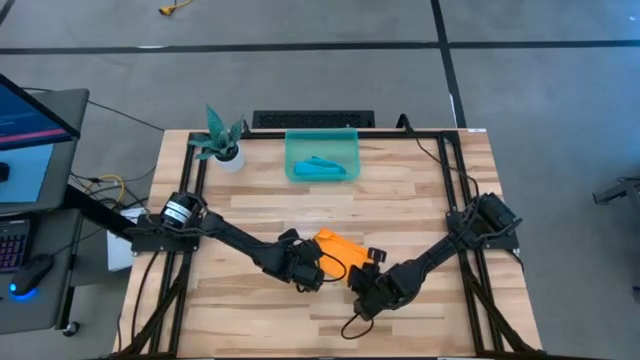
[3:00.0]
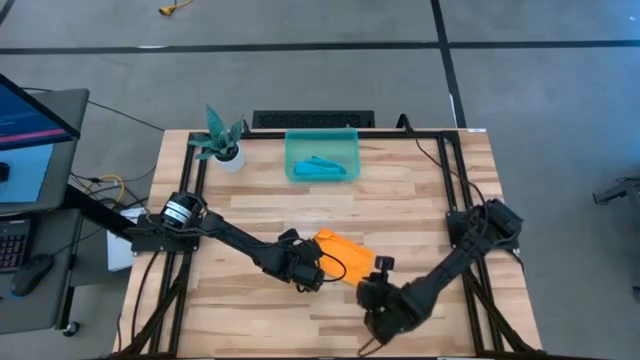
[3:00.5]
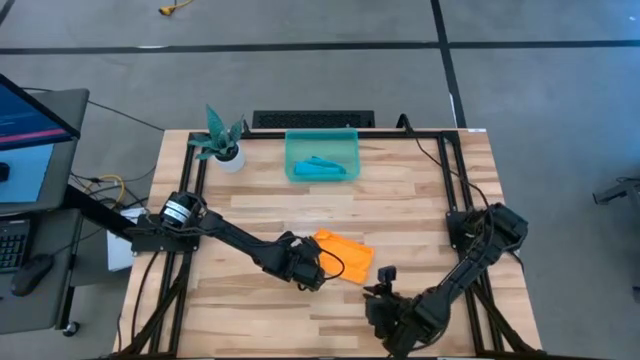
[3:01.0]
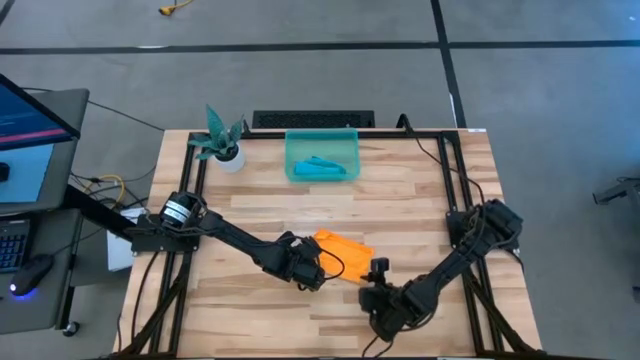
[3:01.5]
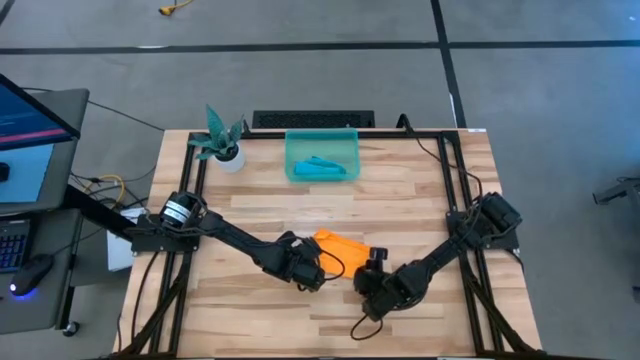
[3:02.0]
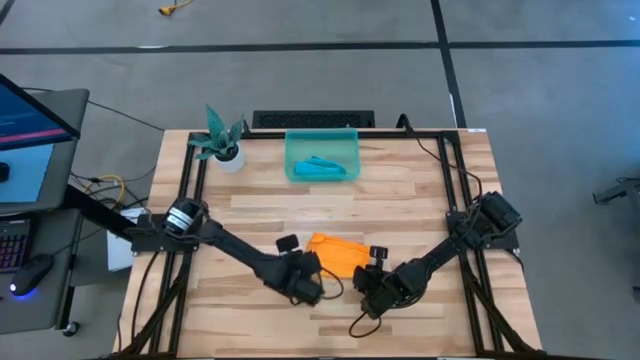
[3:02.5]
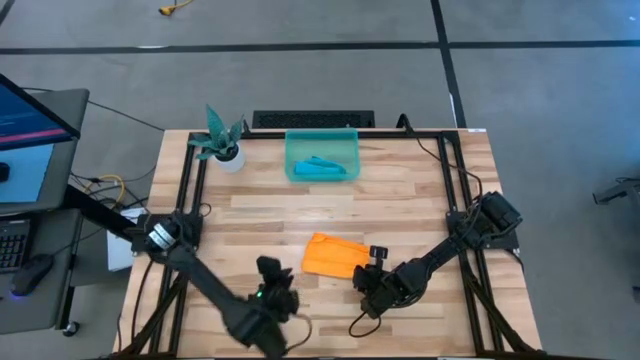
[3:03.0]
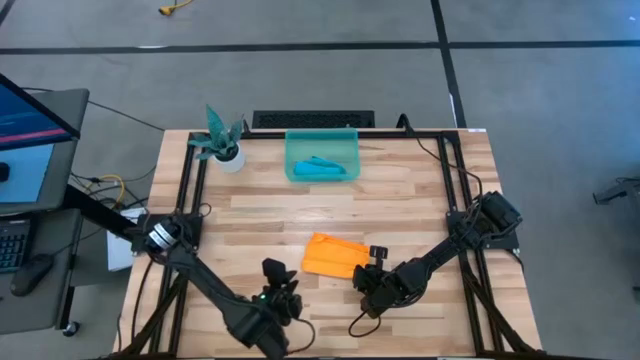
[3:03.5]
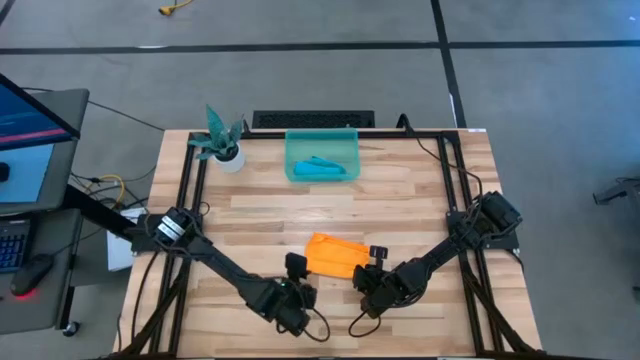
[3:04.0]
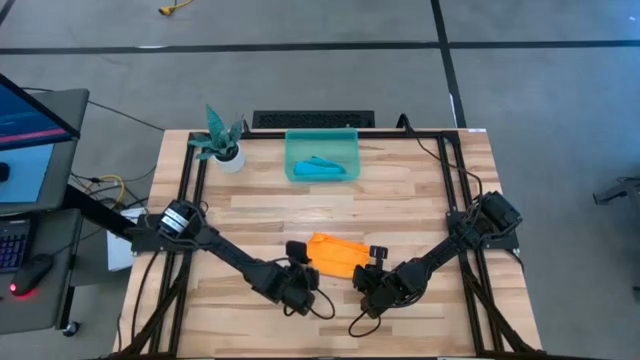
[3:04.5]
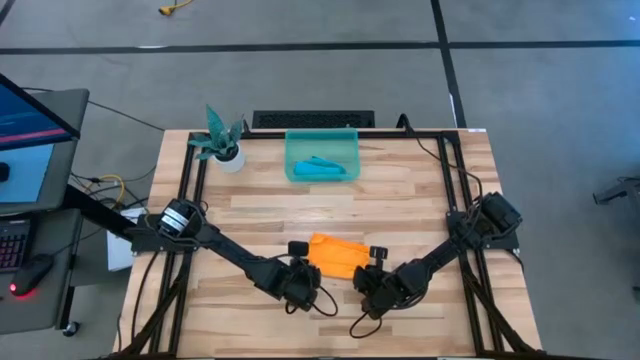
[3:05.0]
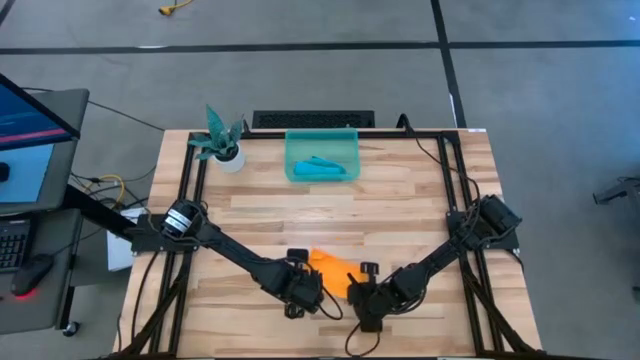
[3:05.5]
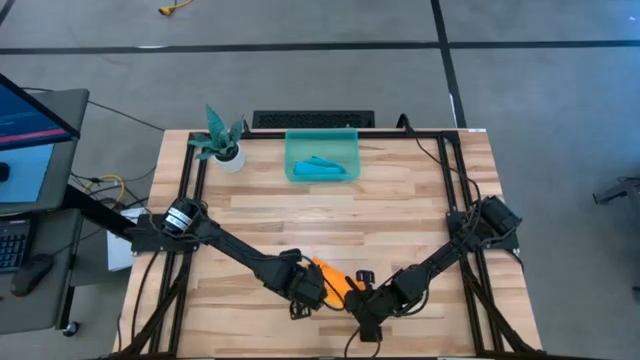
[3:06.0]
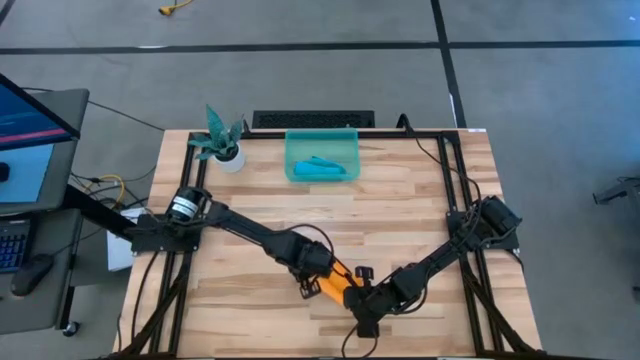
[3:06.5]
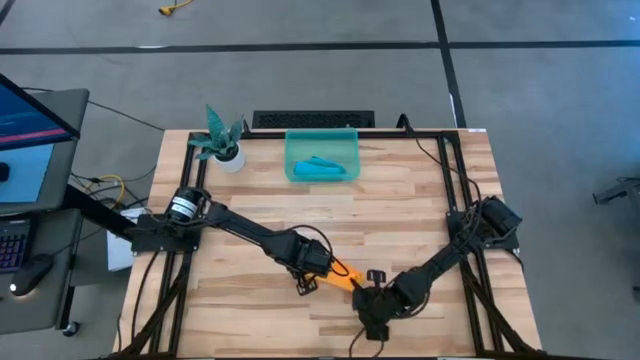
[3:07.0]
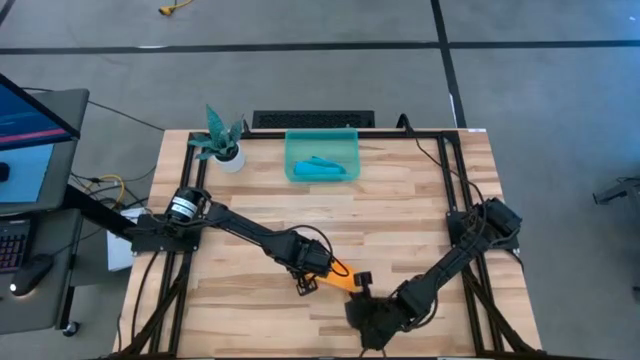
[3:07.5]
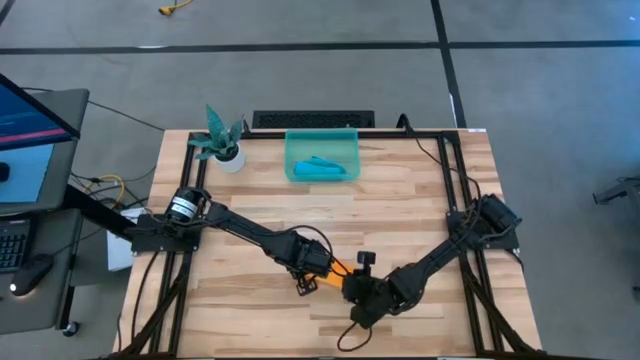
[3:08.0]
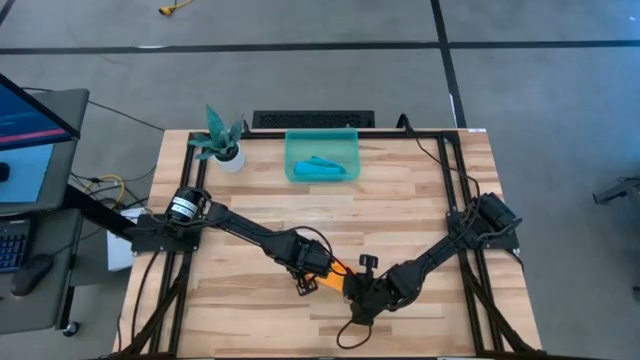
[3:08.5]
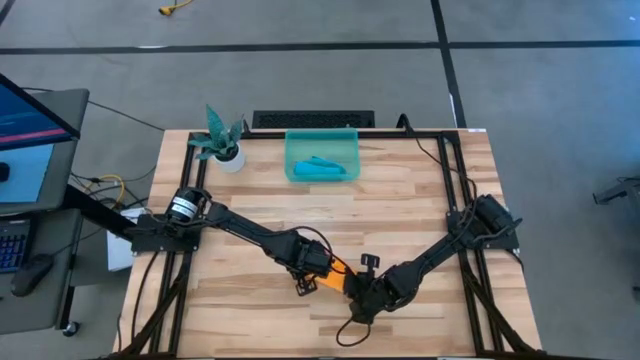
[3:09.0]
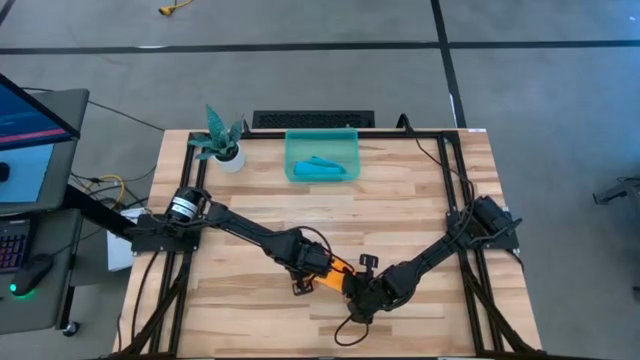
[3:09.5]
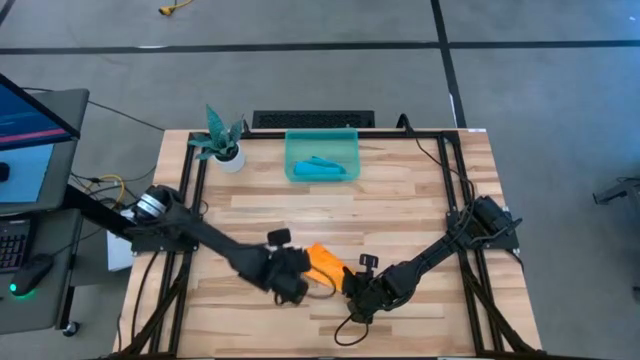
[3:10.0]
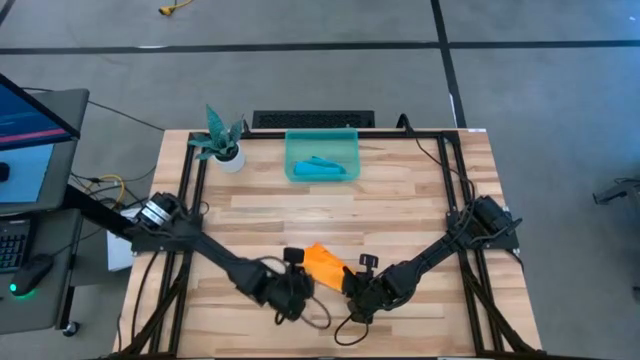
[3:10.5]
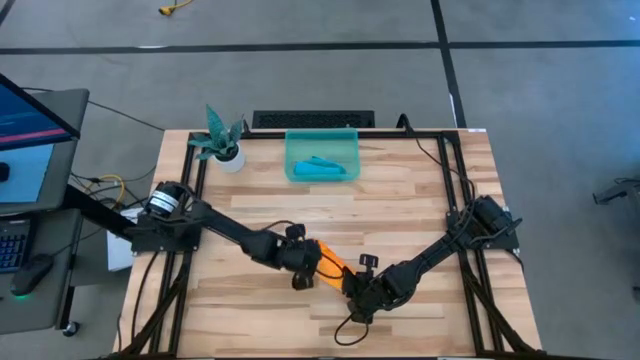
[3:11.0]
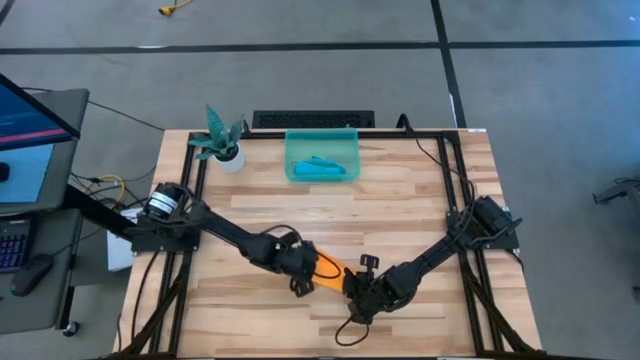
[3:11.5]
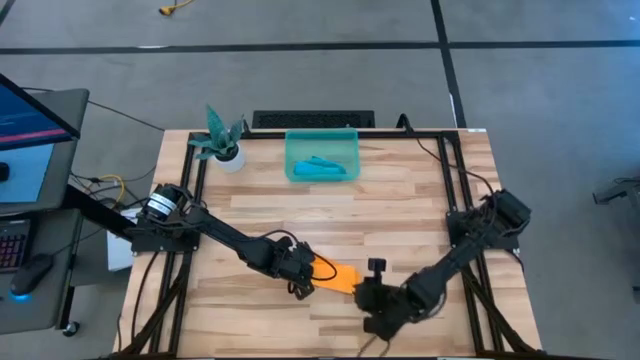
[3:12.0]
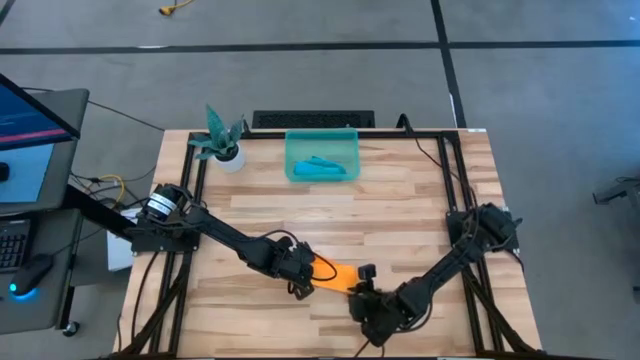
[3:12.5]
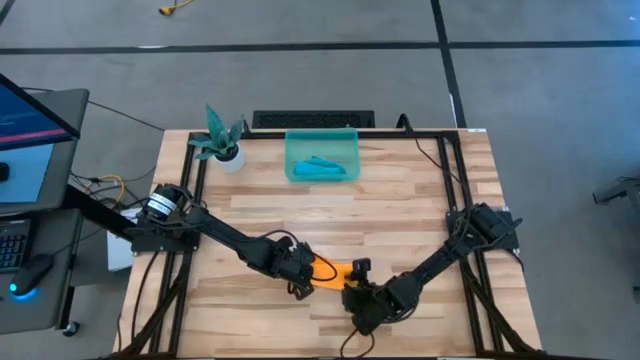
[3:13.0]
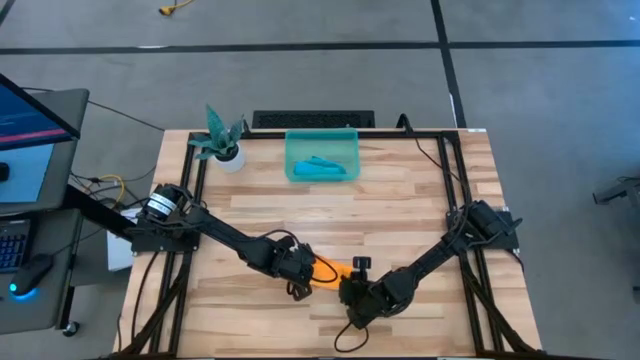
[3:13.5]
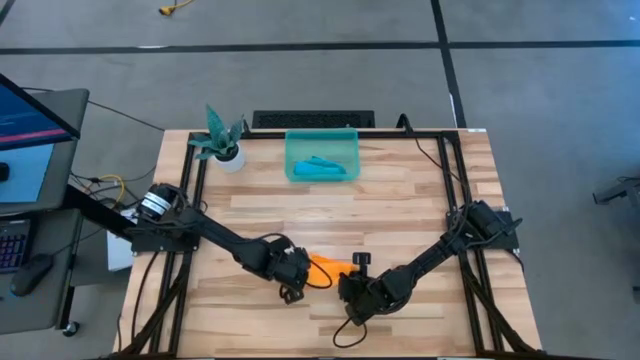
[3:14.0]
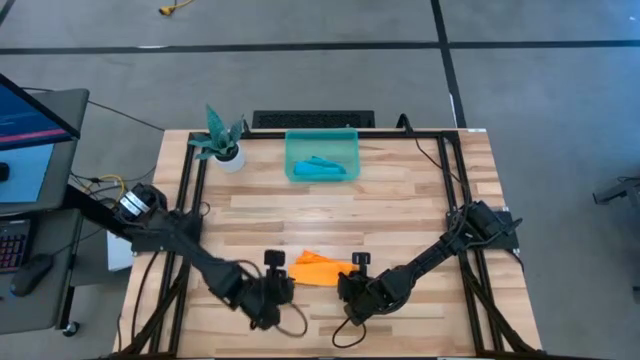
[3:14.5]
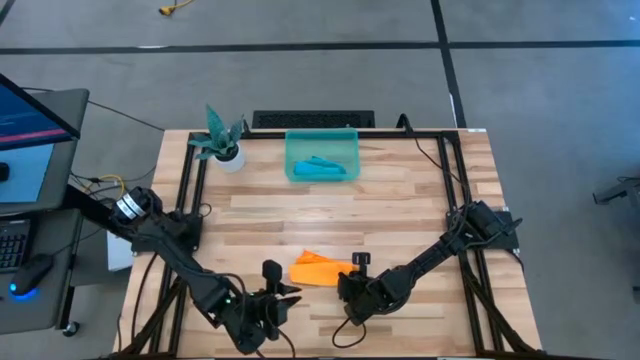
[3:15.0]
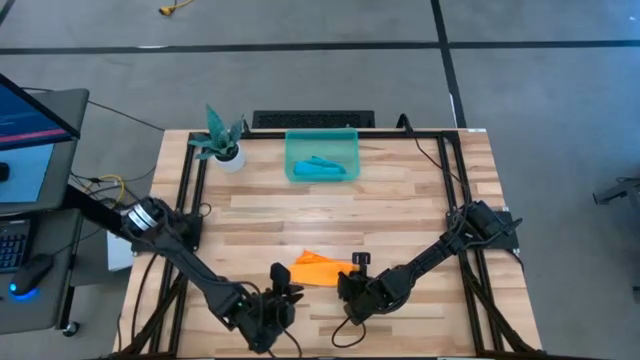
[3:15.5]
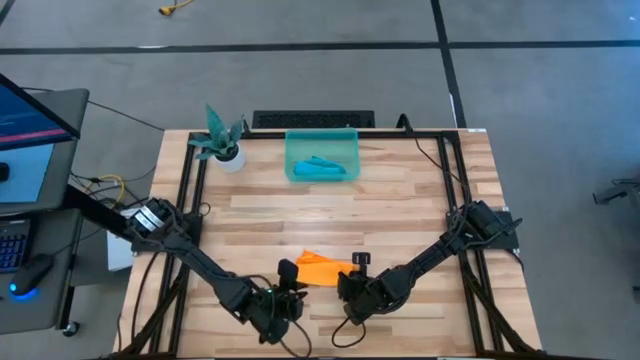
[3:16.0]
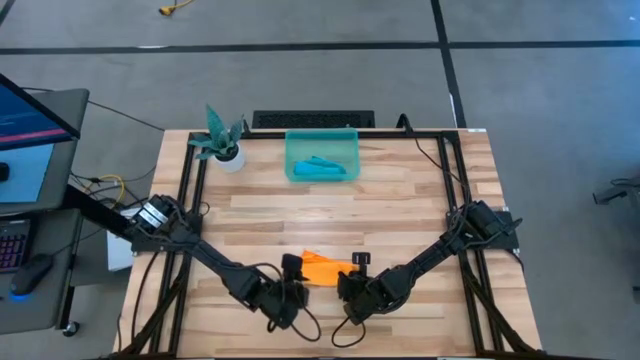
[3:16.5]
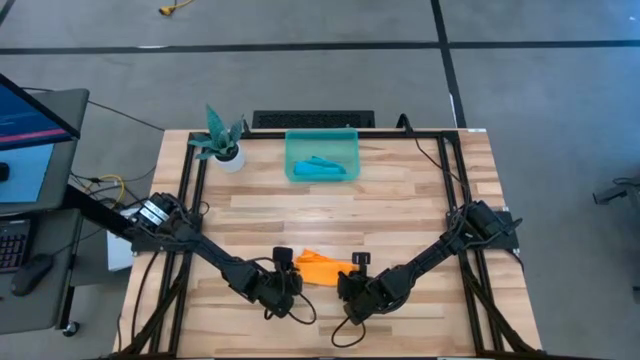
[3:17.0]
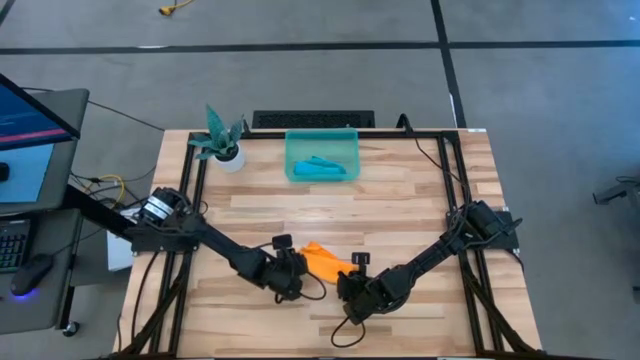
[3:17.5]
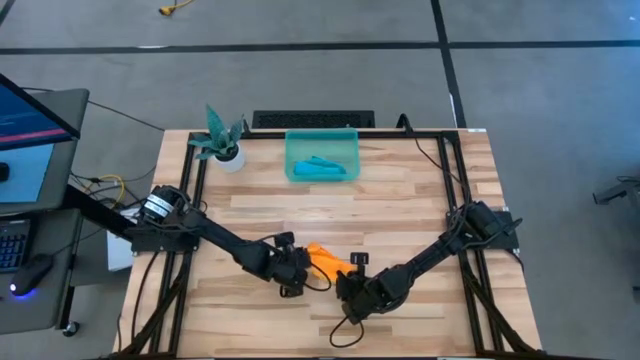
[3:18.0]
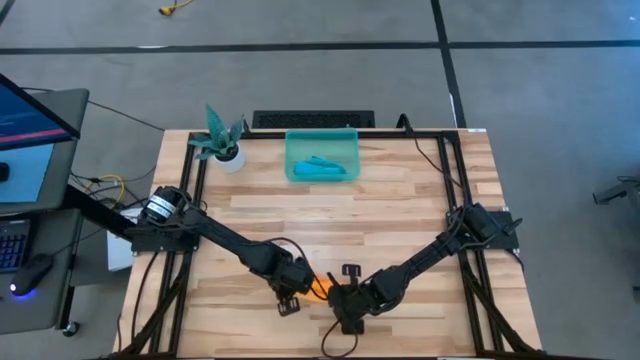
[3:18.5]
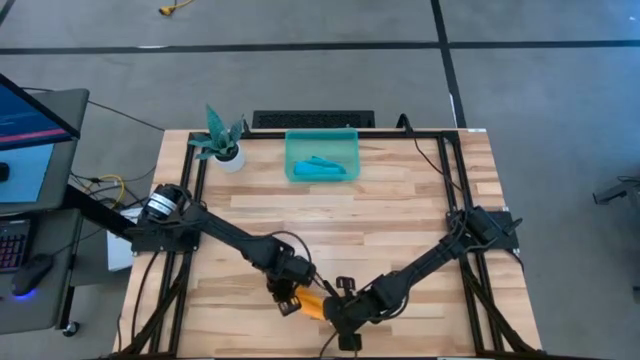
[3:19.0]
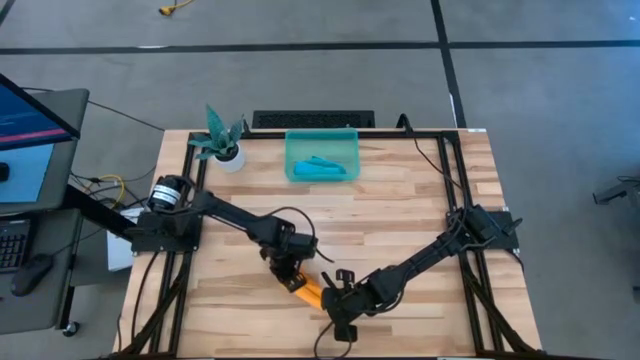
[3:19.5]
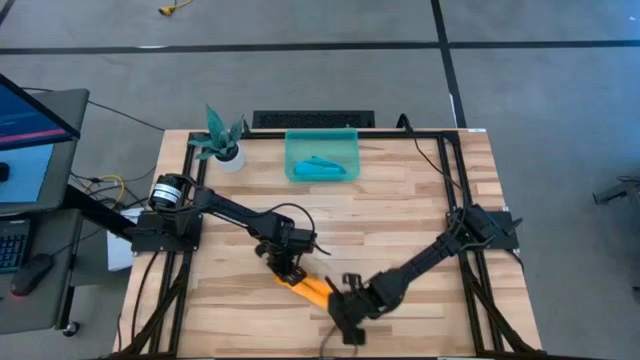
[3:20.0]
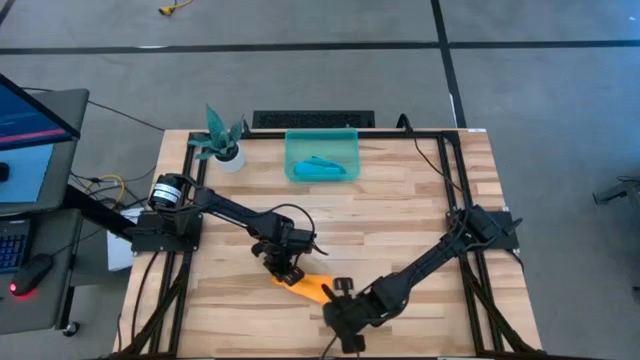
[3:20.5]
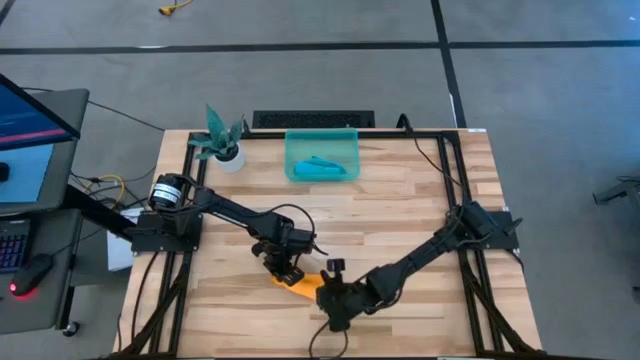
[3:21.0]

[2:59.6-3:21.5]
Task: Roll microfiber towels into tight, uniform cylinder then place into a basket
Roll the orange microfiber cloth
